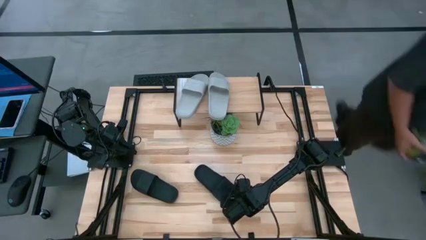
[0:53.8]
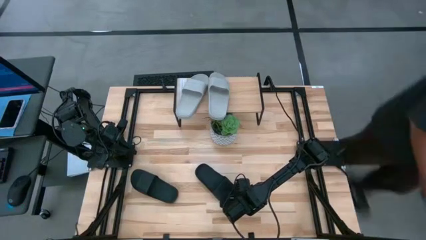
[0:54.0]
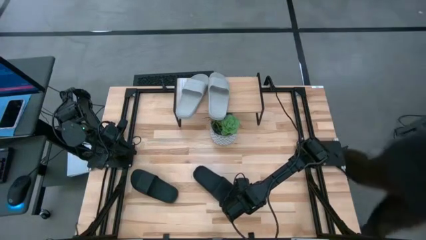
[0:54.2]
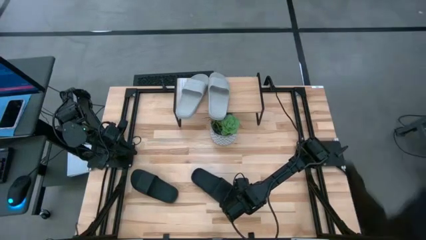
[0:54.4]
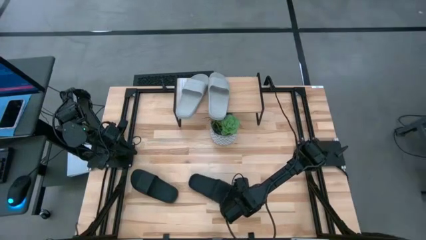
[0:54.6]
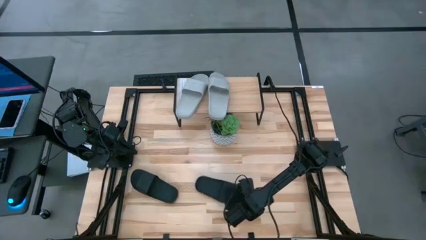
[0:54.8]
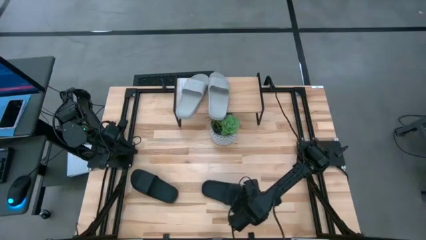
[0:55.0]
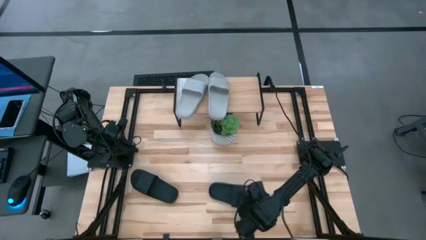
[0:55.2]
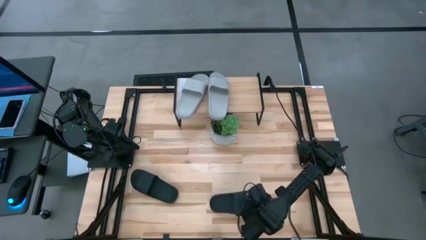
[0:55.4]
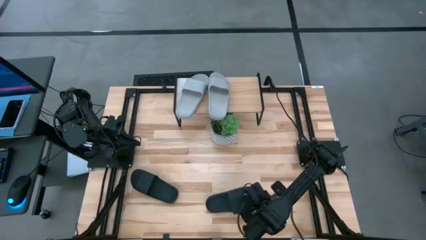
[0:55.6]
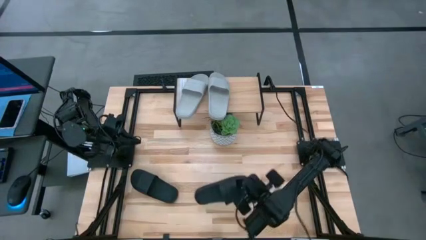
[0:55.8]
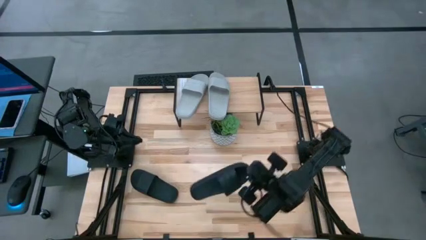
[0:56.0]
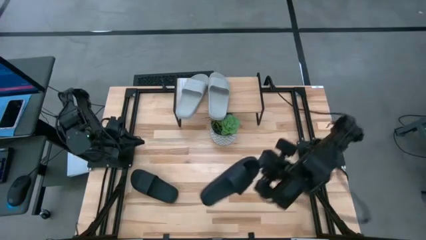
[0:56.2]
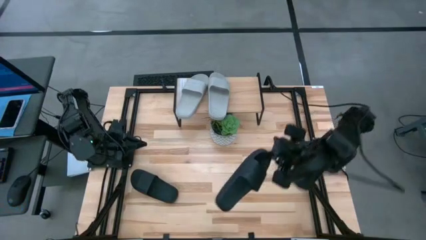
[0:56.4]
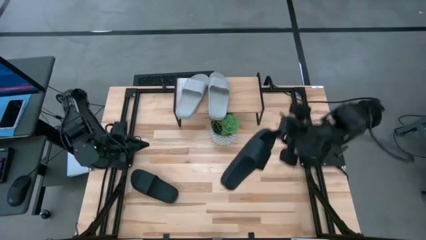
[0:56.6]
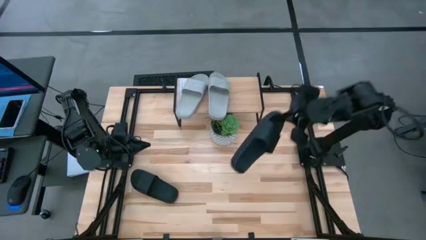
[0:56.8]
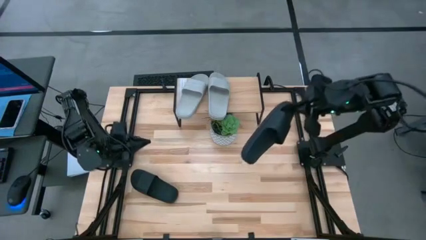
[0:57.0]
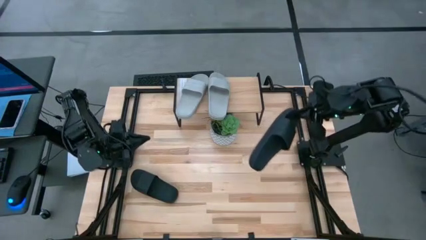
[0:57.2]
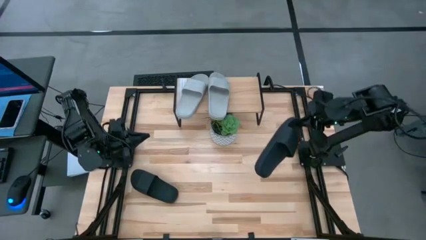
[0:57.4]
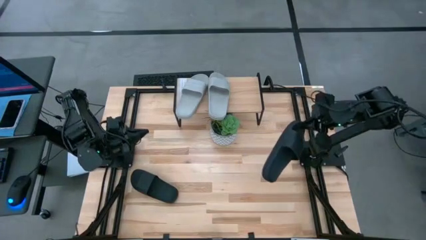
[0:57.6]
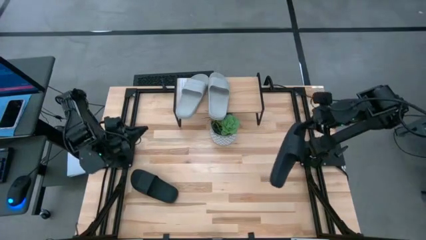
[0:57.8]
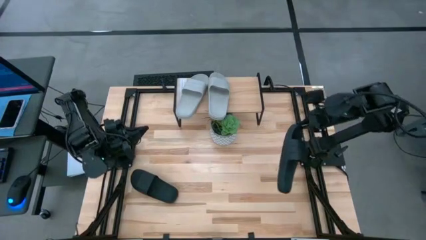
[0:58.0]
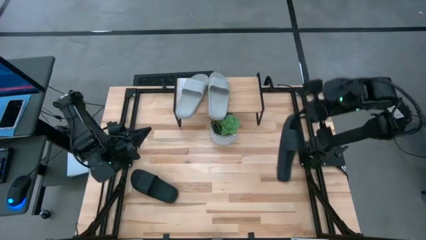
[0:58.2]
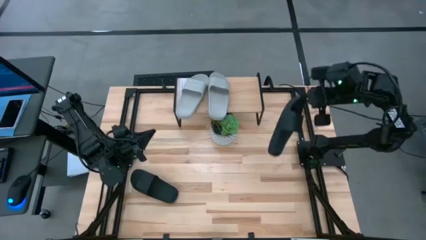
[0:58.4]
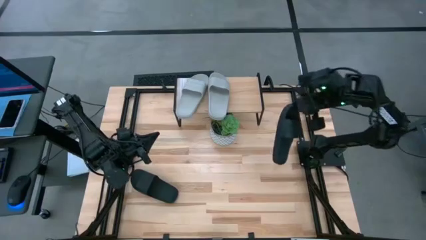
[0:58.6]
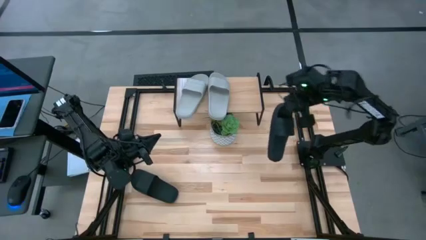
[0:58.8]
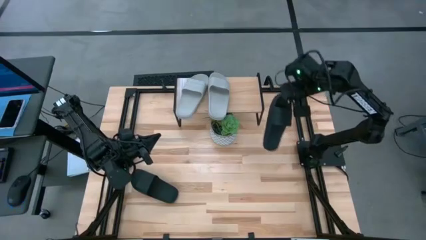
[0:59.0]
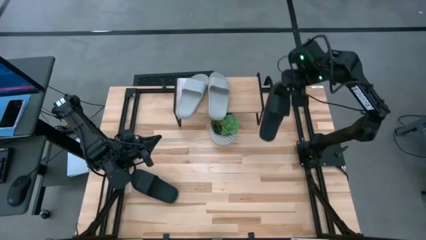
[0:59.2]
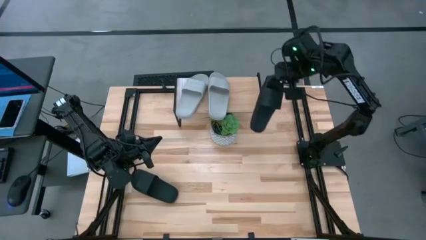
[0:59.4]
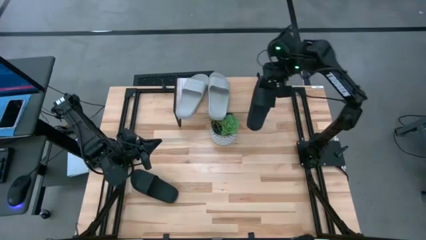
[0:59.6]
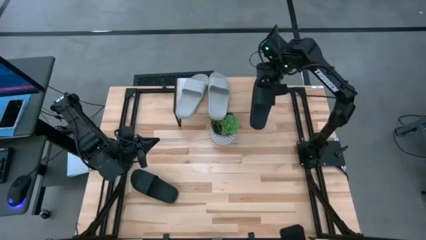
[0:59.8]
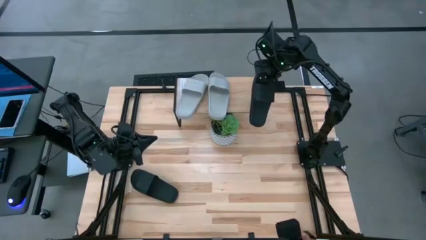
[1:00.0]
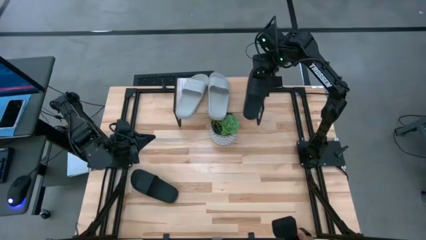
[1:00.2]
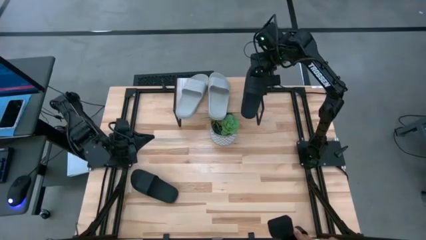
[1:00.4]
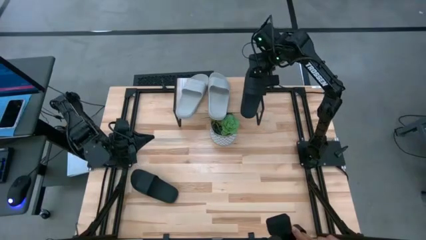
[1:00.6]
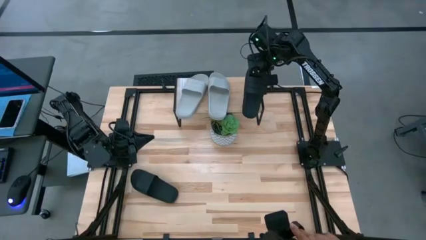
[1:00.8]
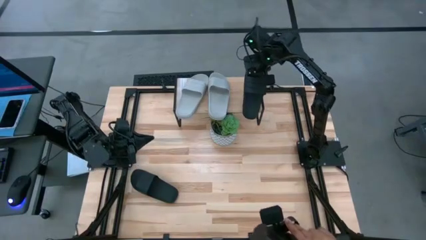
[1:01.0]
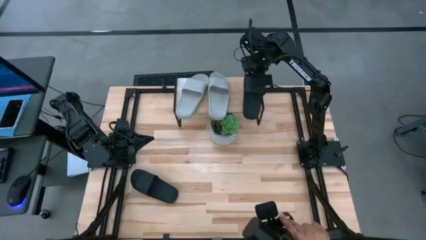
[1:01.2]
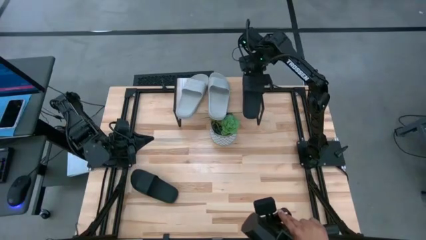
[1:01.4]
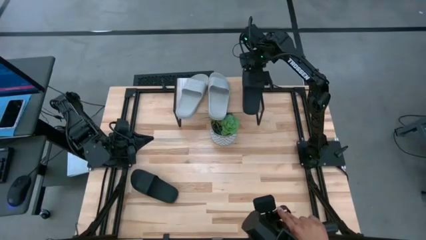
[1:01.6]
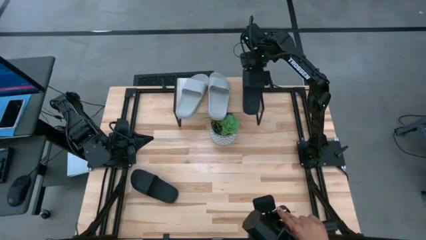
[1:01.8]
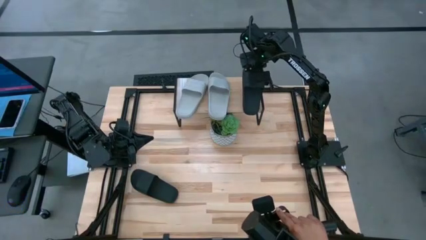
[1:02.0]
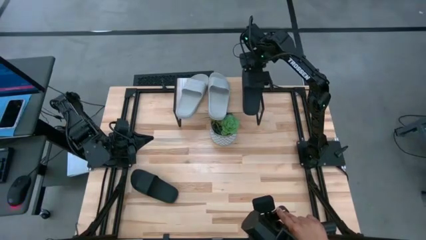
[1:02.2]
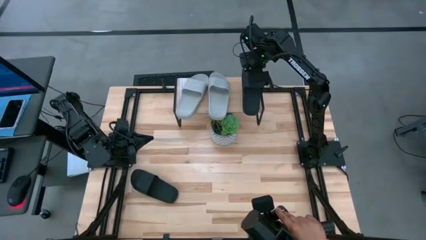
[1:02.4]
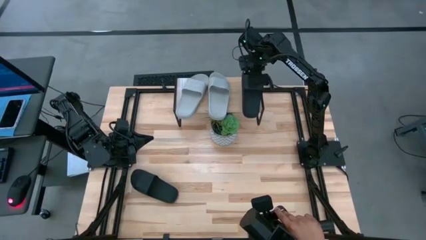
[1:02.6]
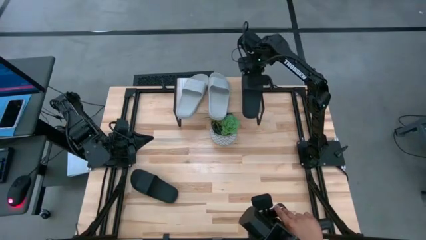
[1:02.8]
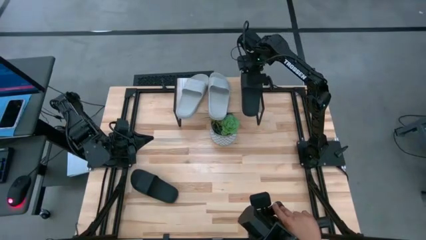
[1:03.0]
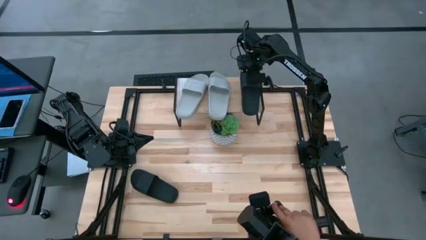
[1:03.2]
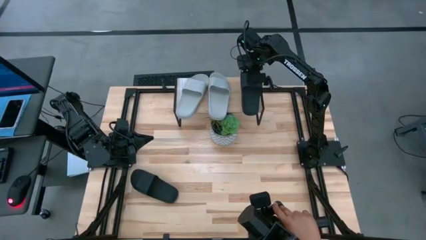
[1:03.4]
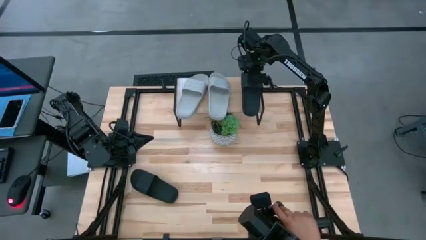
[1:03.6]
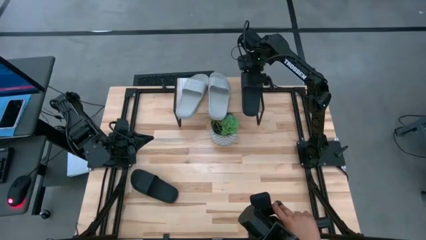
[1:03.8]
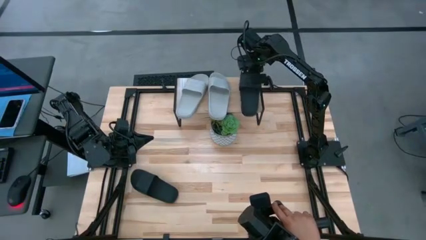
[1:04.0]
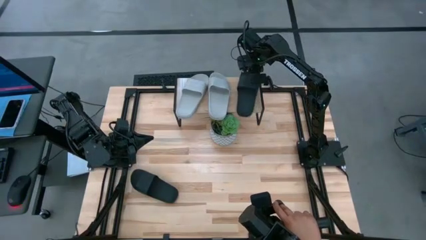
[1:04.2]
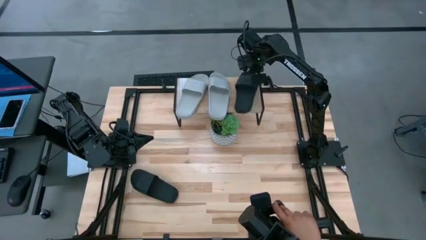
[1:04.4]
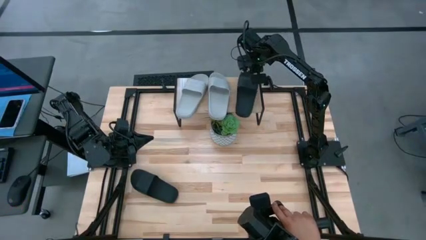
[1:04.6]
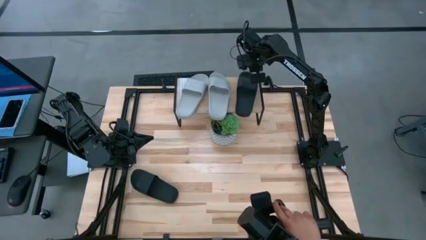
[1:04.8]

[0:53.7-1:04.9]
Task: Pick and place slides into the shelf
Put the right black slide on the shelf

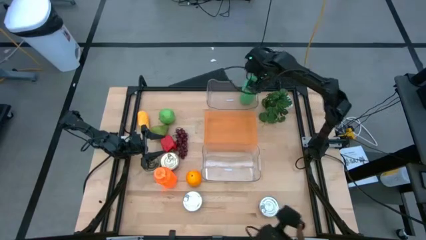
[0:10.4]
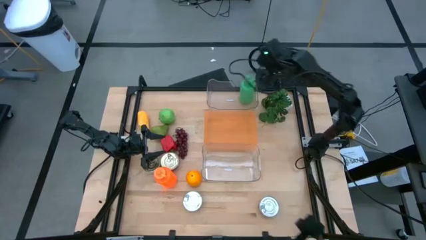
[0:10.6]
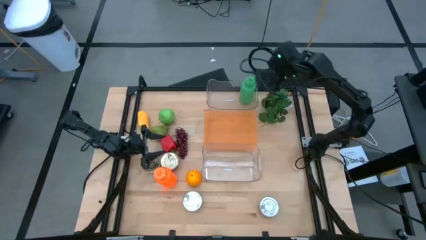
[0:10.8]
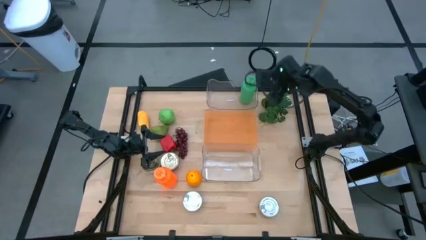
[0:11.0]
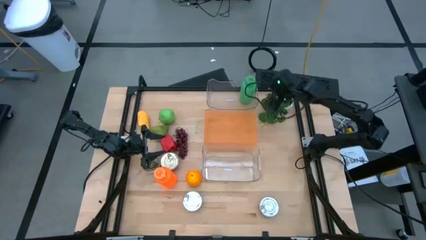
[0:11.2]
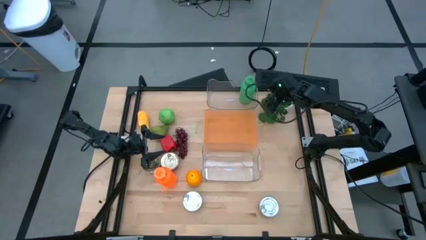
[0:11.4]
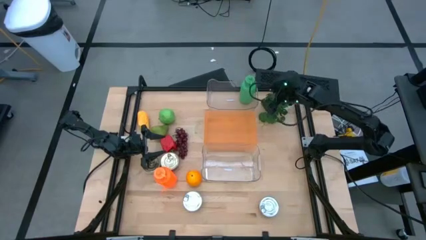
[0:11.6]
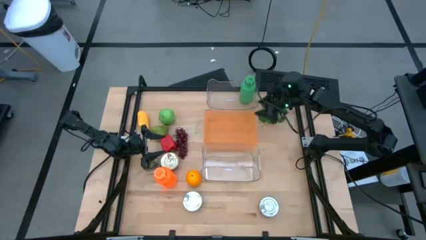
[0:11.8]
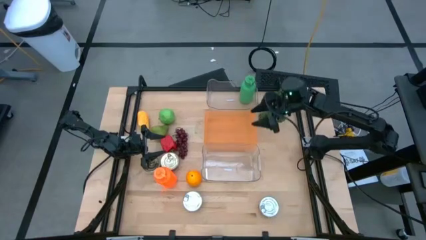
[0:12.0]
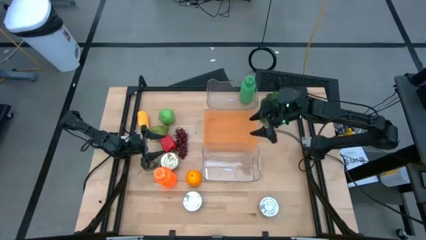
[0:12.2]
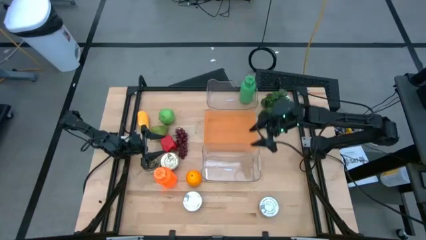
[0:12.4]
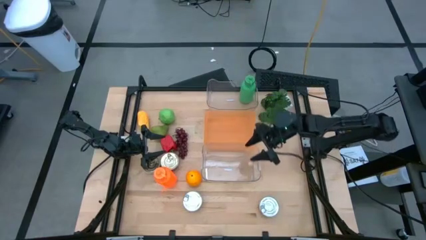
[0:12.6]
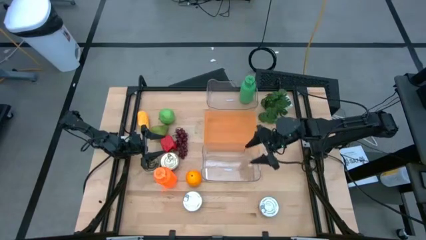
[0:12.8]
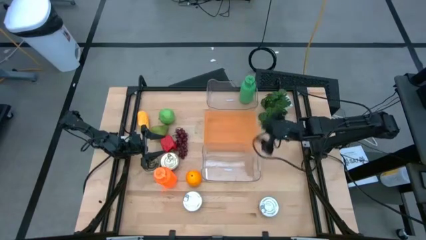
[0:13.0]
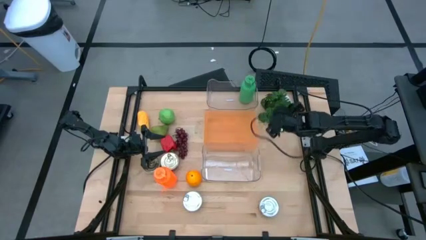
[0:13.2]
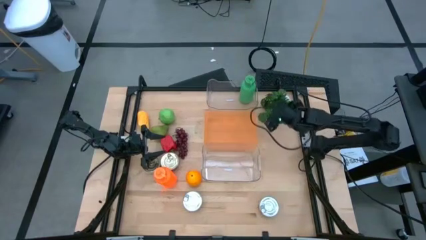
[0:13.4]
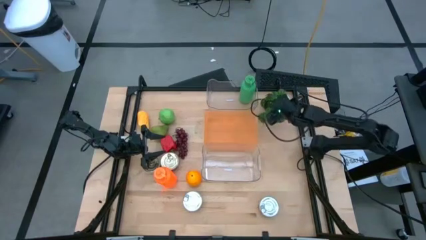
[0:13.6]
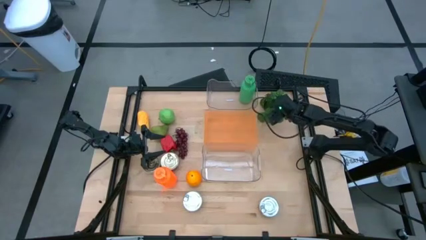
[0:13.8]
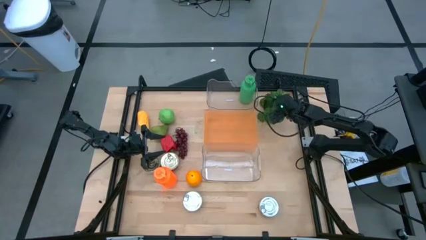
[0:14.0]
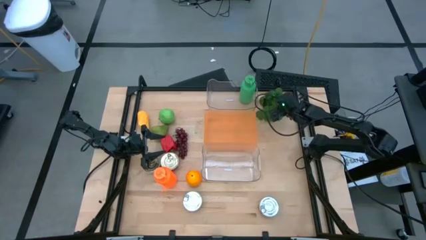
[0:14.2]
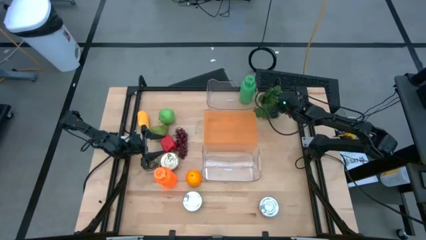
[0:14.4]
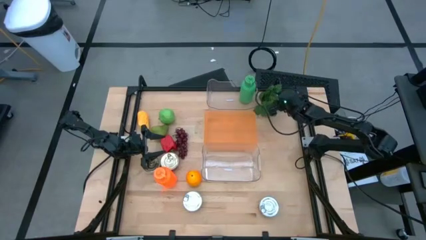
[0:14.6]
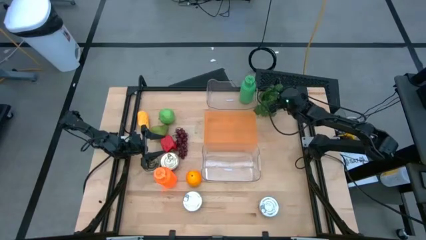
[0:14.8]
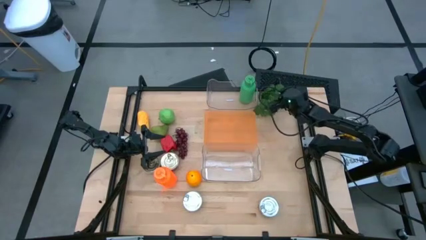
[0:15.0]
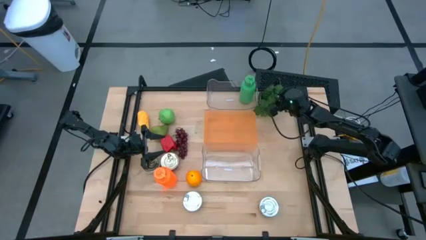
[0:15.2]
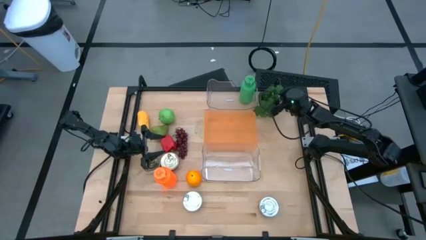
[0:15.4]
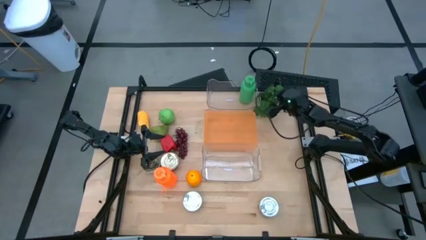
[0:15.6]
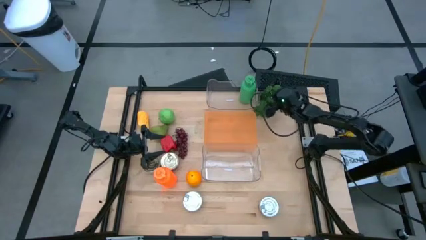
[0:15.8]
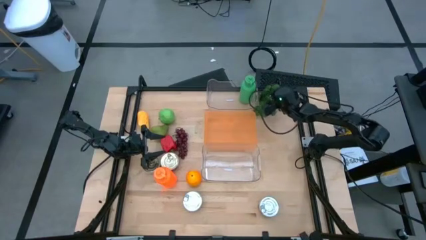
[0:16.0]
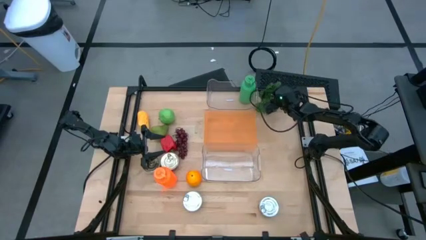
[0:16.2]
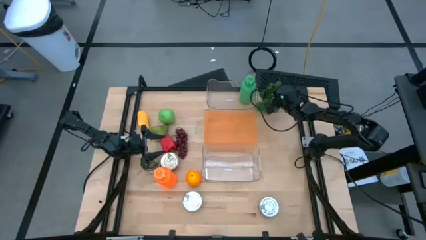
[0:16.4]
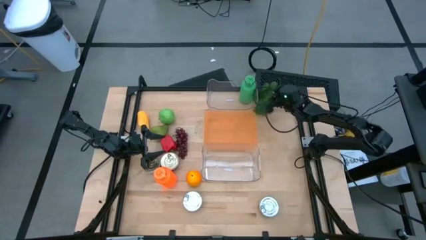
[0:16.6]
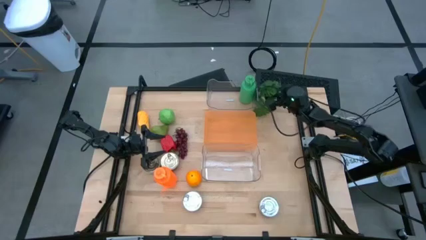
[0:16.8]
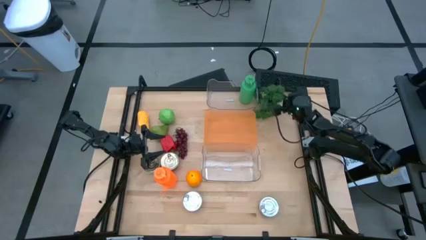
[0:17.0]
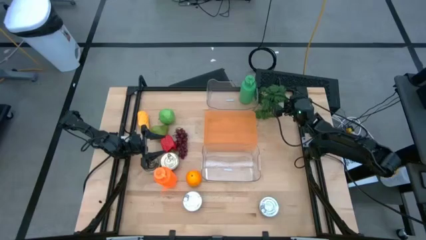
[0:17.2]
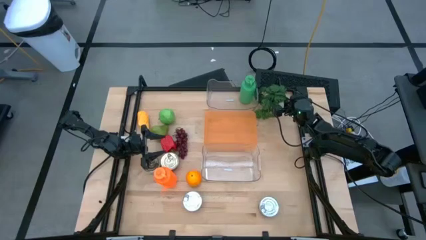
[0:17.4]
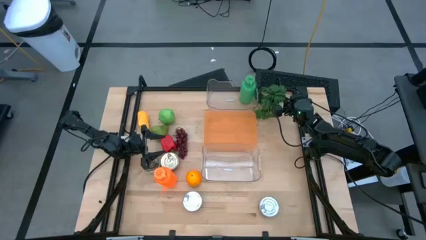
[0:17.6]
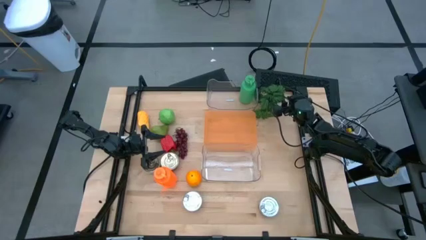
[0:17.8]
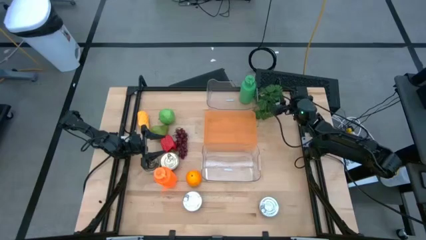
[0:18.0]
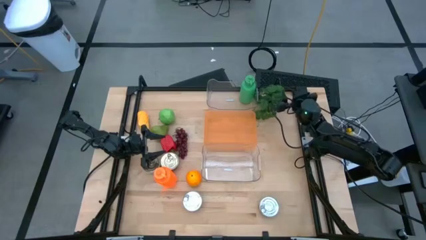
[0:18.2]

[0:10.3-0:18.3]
Task: Pick & Place Food Item
Adjust the pot of plants on the table
